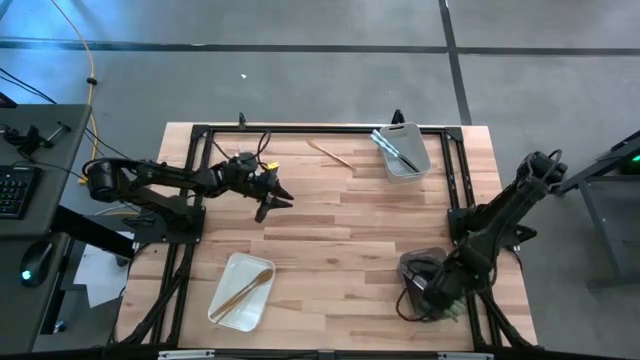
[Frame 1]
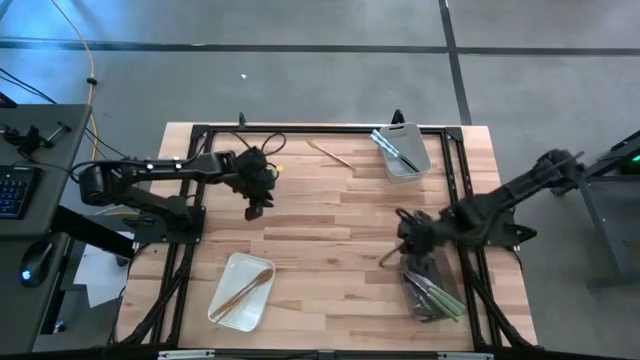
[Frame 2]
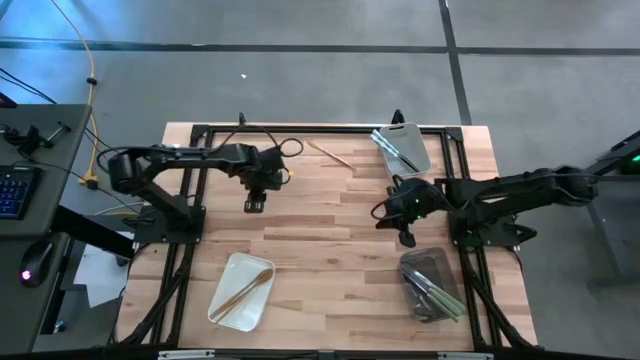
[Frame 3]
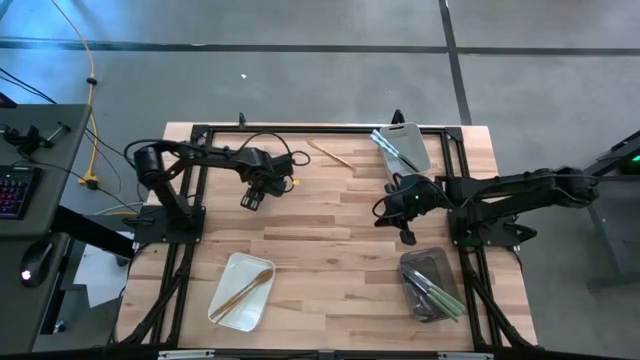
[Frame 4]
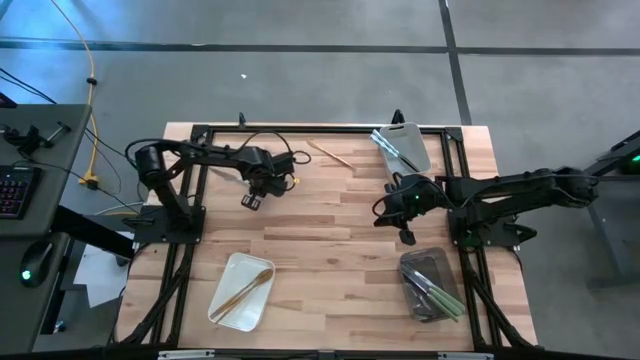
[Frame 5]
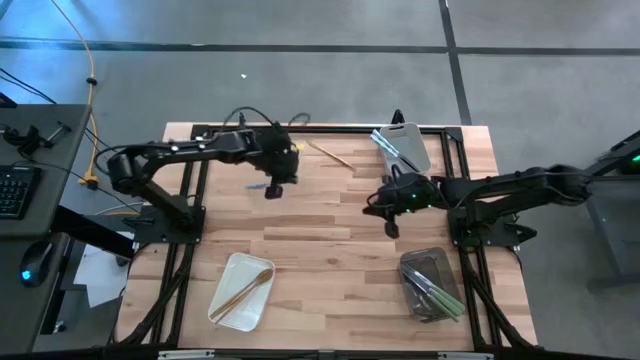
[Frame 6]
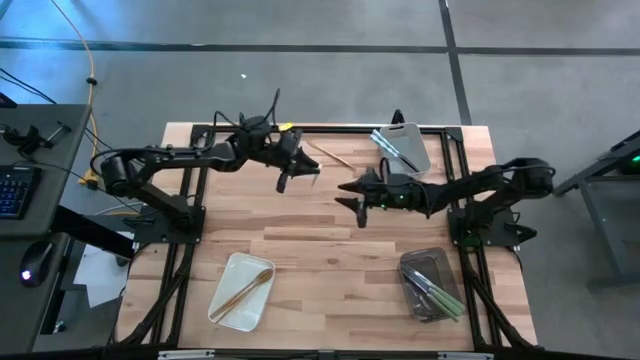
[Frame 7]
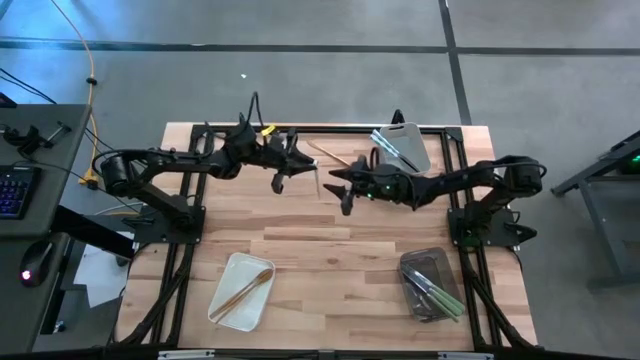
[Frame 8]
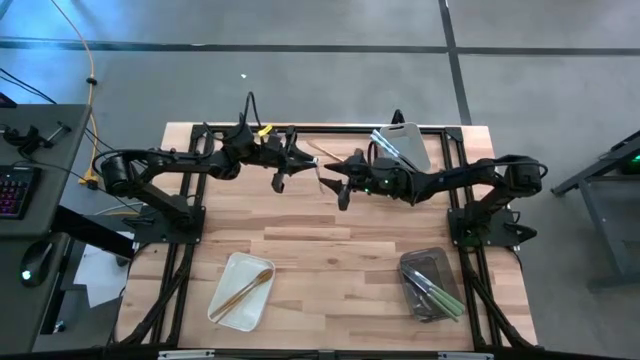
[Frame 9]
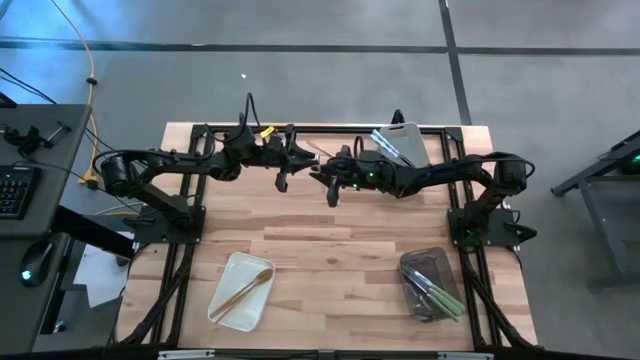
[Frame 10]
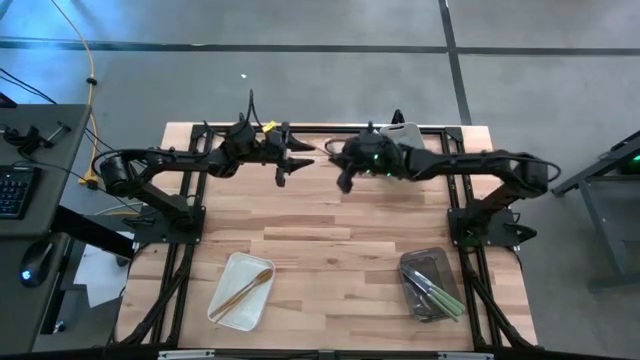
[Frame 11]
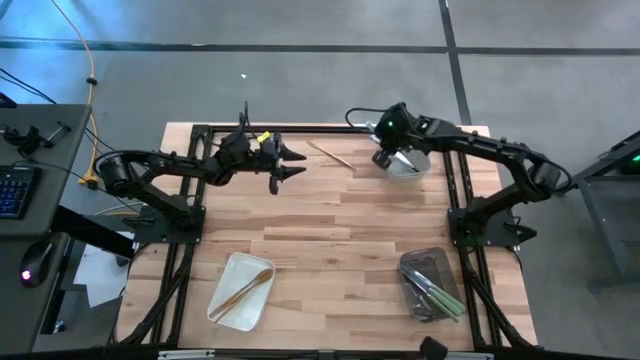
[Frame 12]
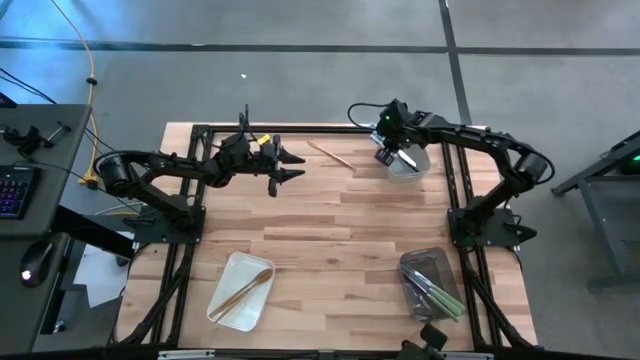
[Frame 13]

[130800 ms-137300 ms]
Task: Sort silverware by color (type)
Put the blue patterned table knife into the gray bin

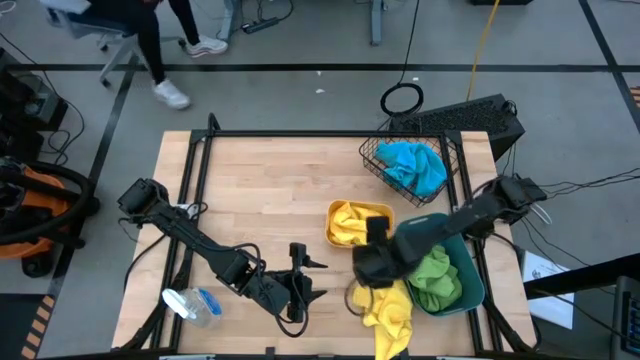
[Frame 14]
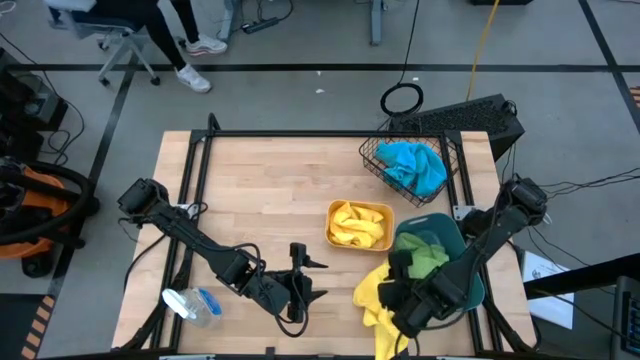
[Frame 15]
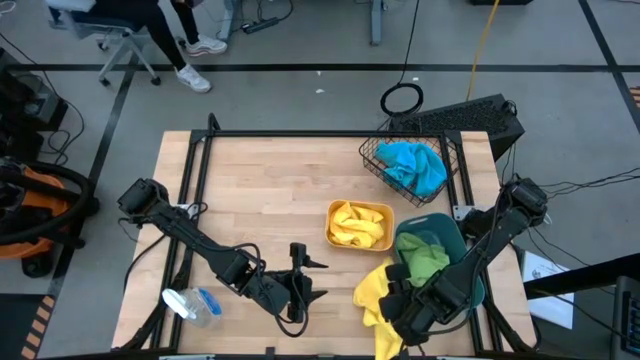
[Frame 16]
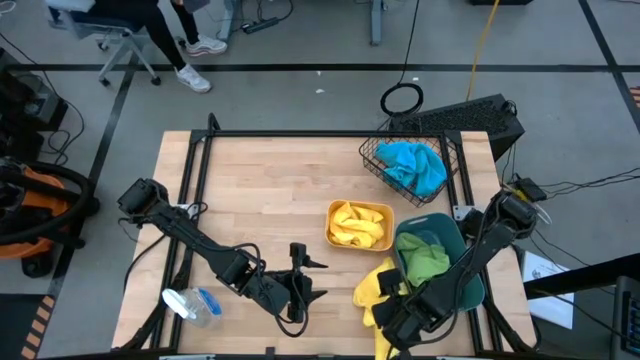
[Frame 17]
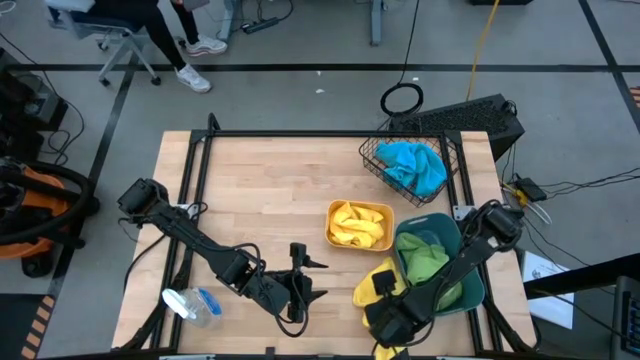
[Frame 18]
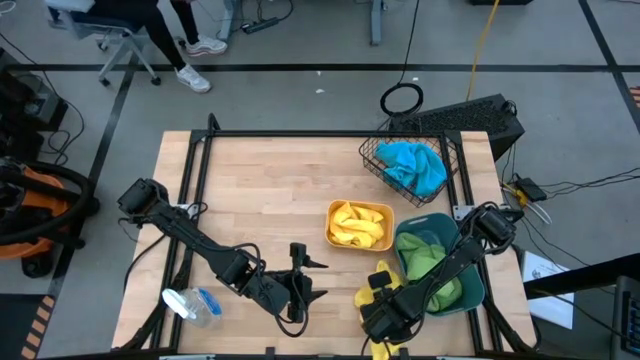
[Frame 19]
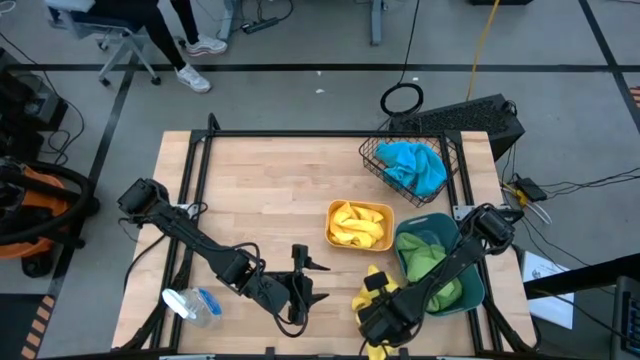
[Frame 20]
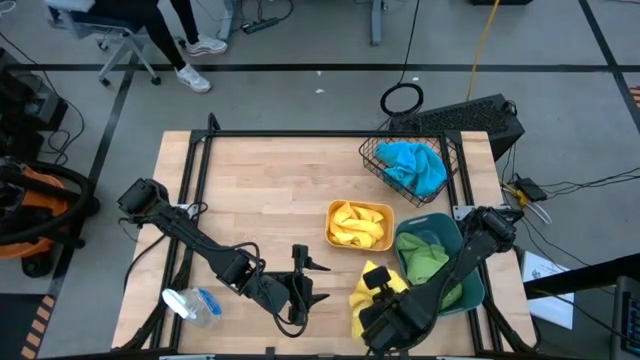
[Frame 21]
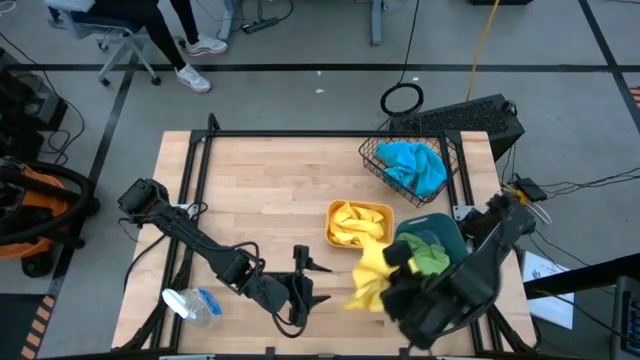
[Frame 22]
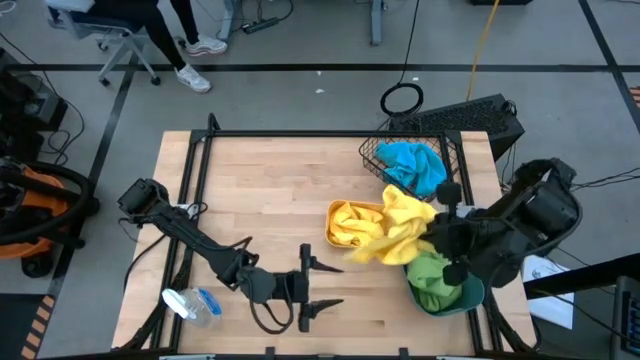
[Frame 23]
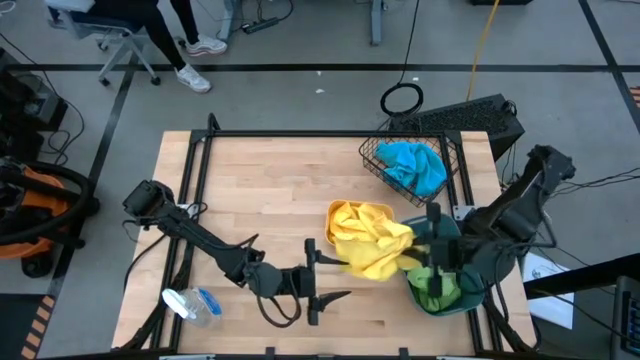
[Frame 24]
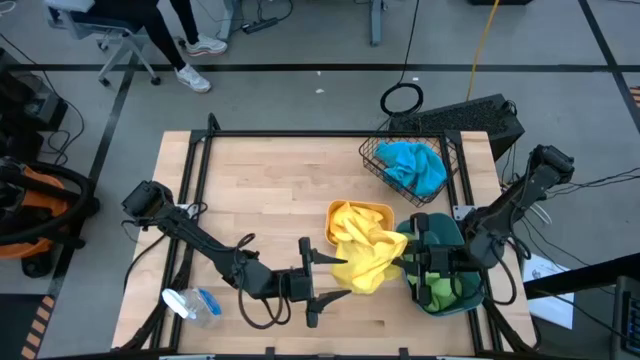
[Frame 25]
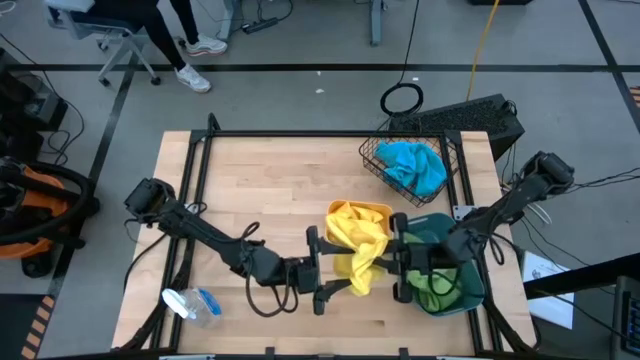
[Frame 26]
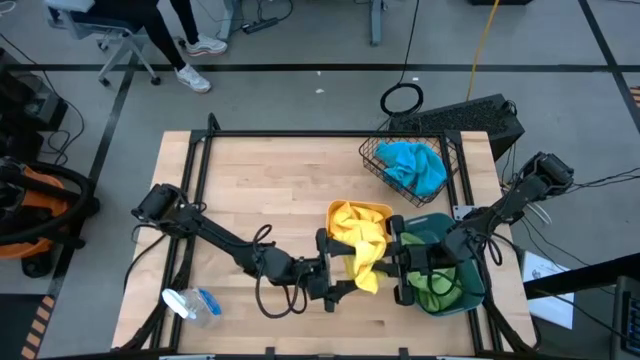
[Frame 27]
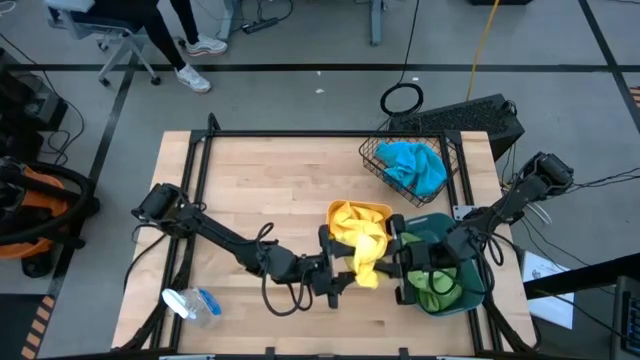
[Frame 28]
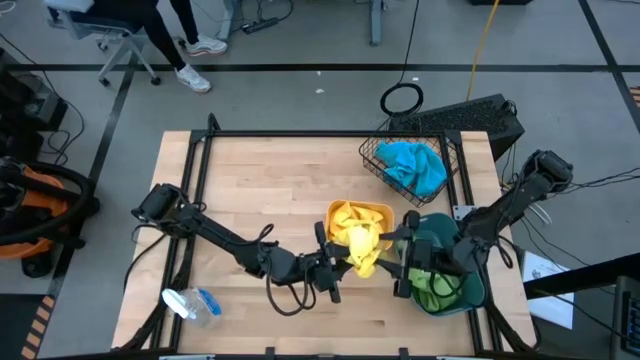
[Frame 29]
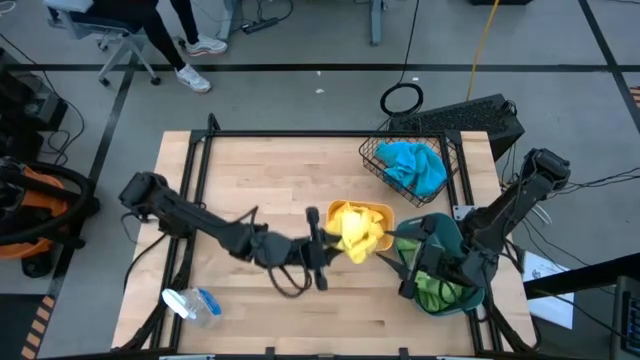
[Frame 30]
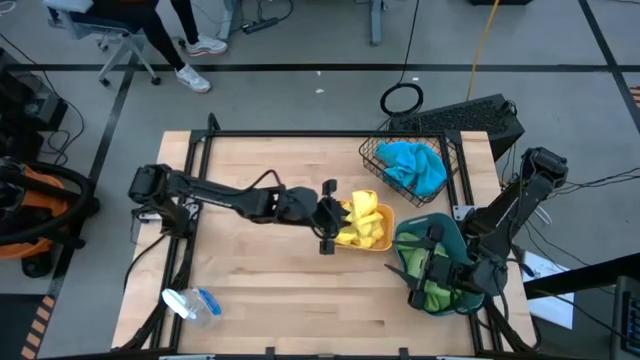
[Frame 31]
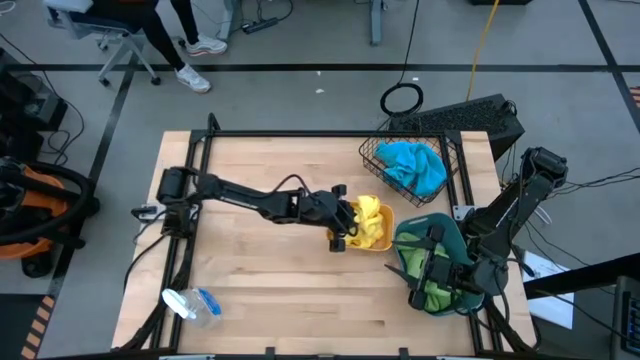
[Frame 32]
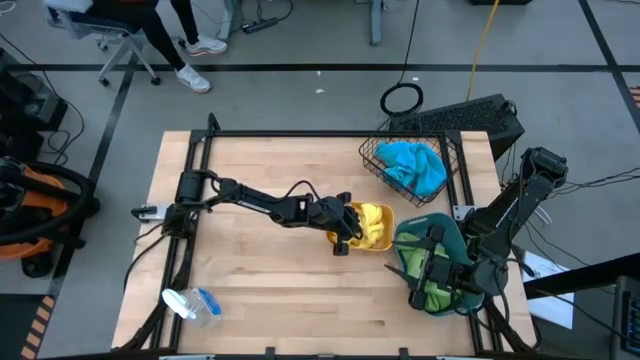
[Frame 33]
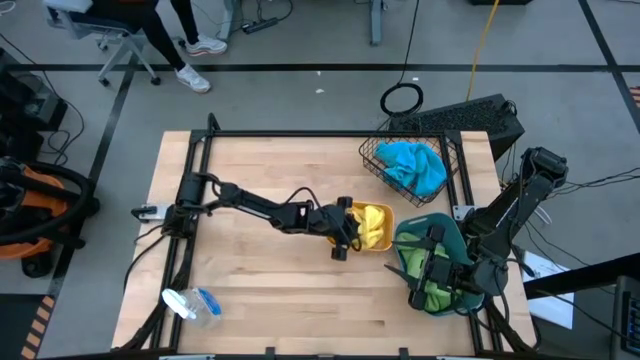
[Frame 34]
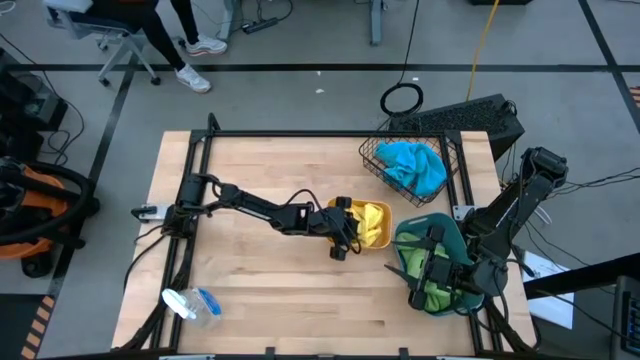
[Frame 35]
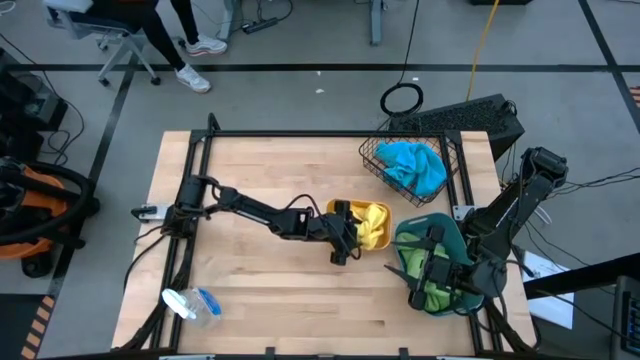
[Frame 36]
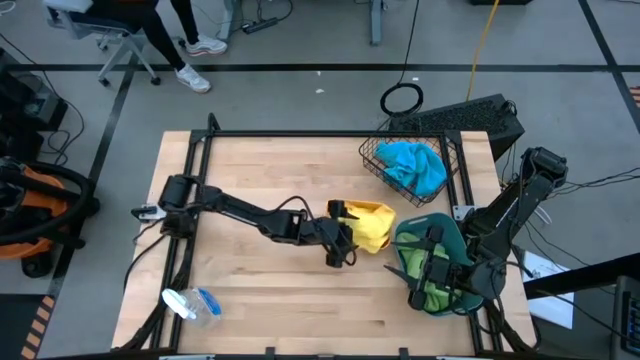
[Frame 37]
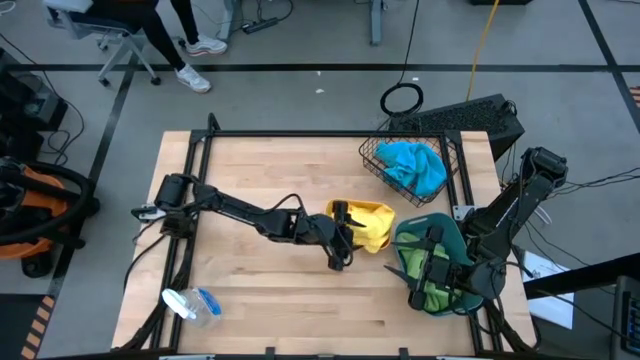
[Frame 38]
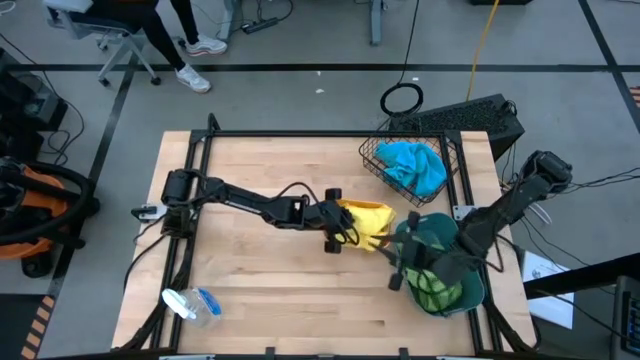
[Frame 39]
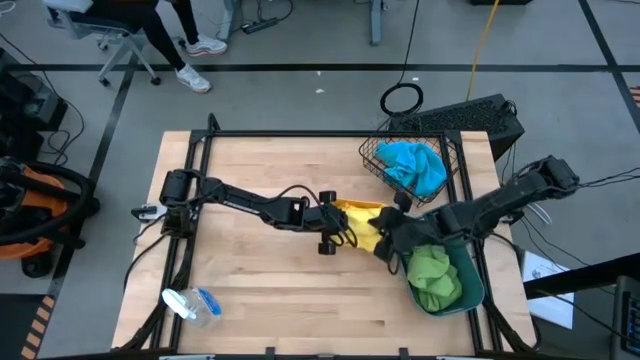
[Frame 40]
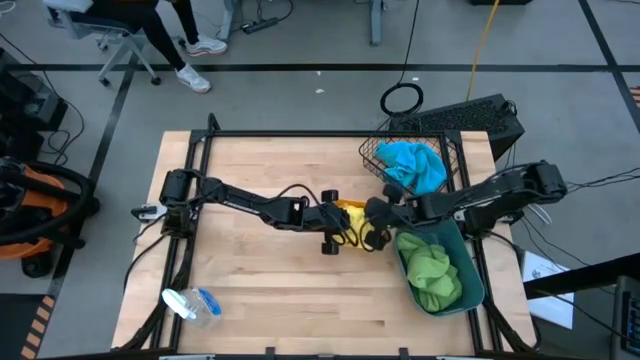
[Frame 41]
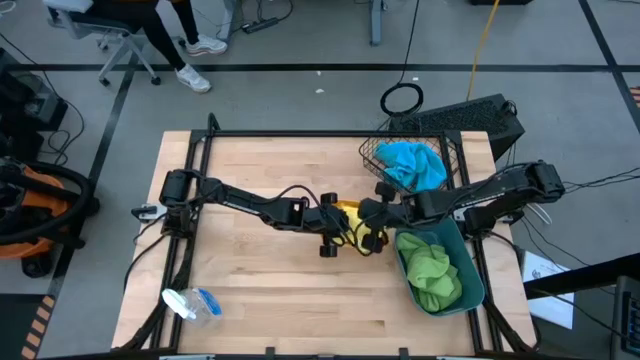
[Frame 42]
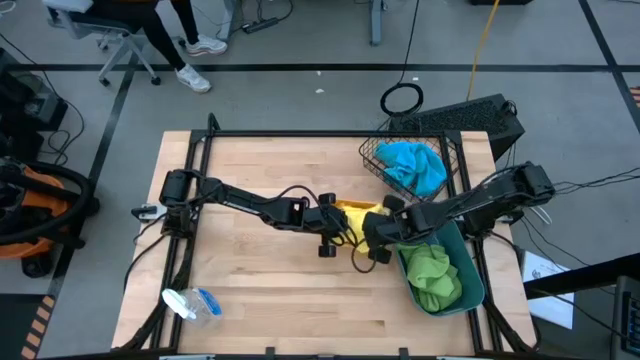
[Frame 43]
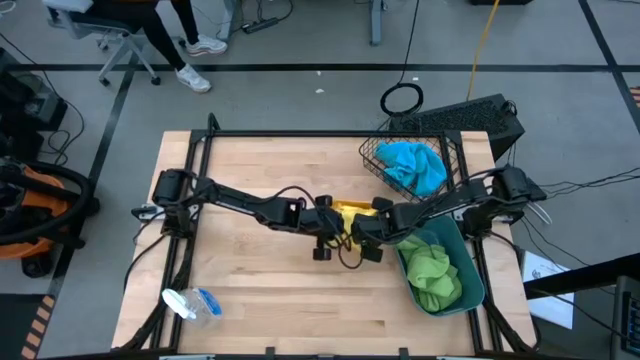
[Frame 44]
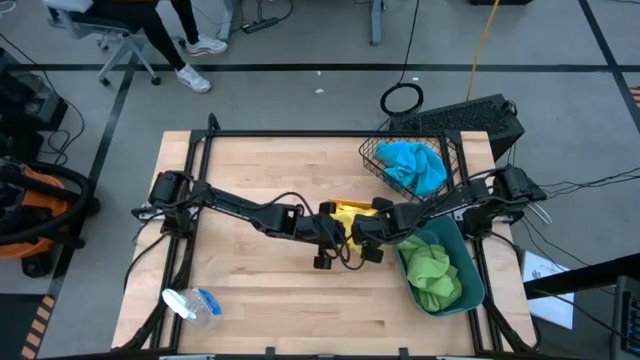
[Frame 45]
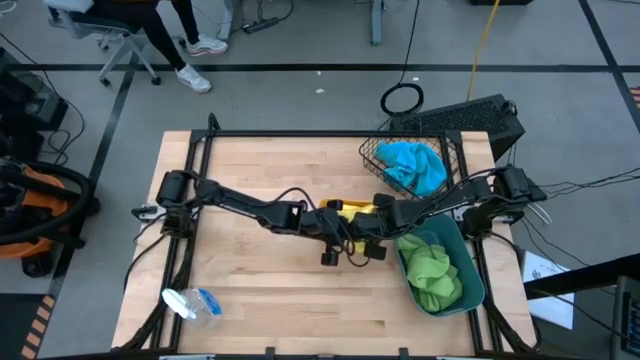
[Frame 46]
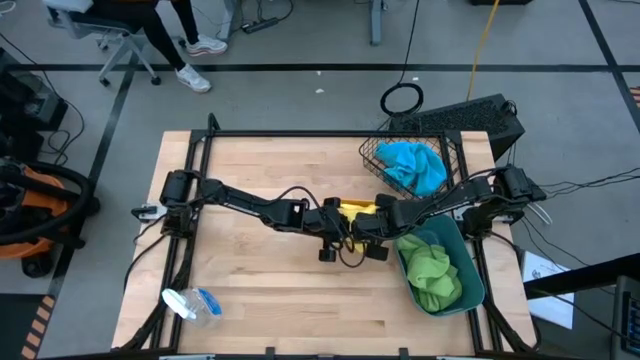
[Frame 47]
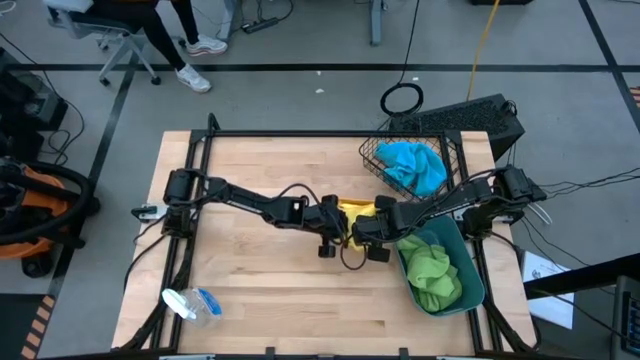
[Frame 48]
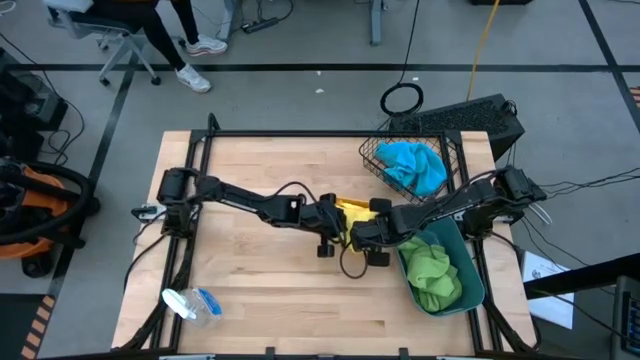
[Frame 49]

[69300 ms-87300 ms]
Task: Sort microfiber towel by color & place in baskets
Put the yellow microfiber cloth into the orange bin
